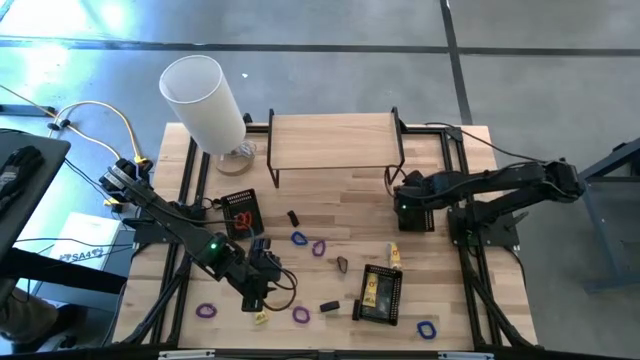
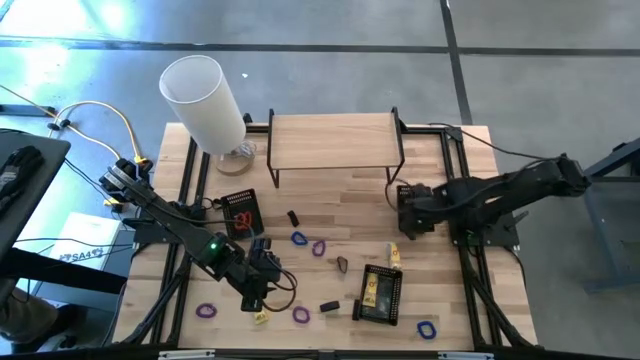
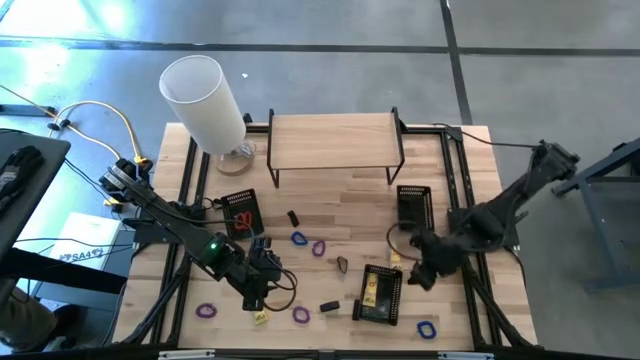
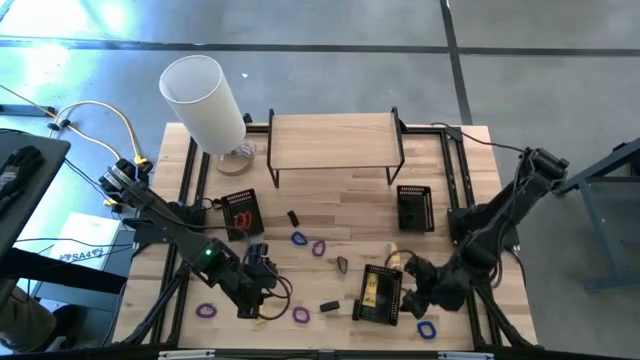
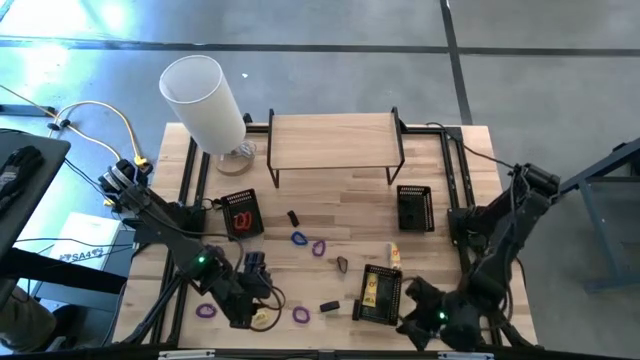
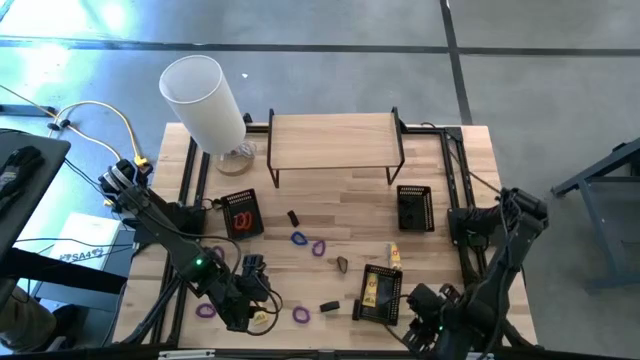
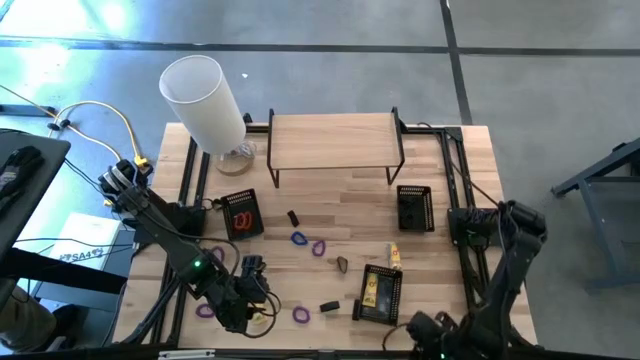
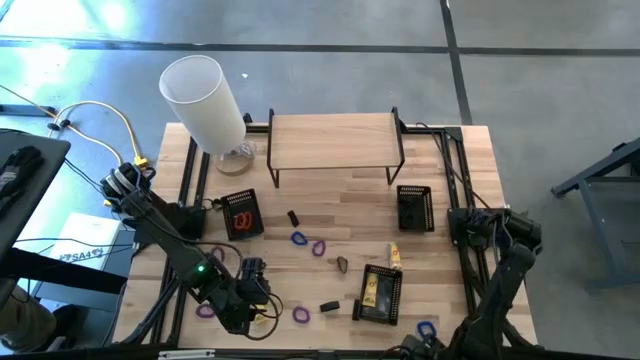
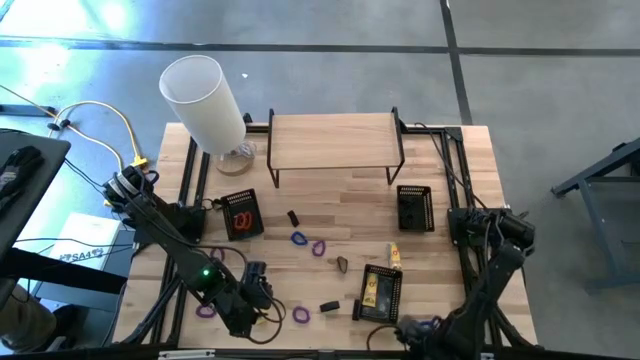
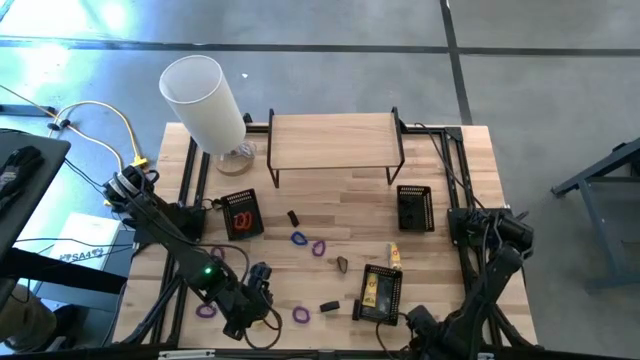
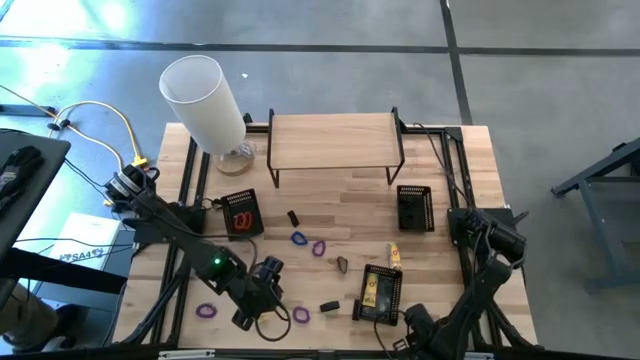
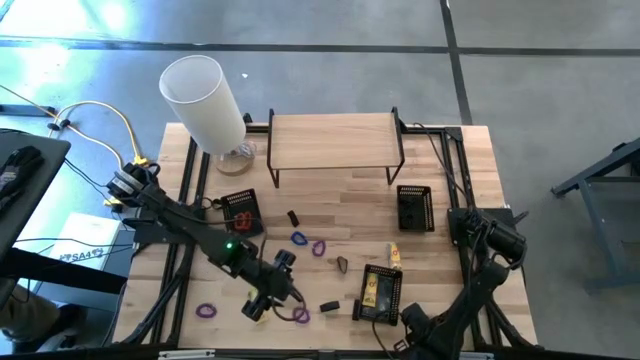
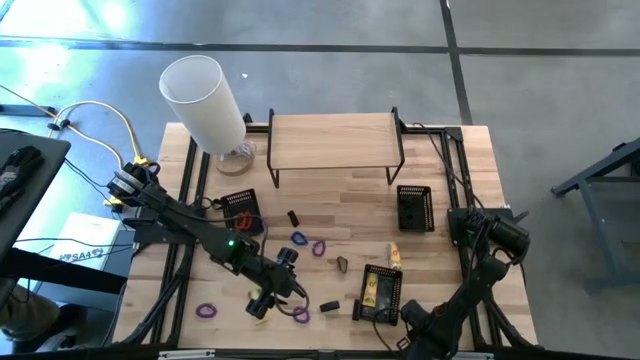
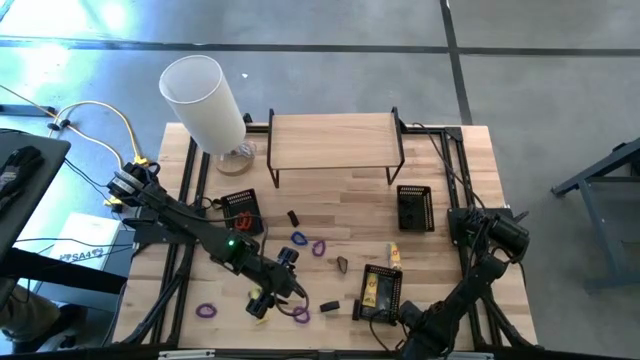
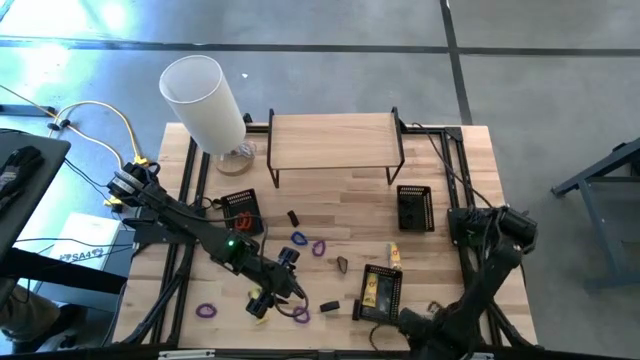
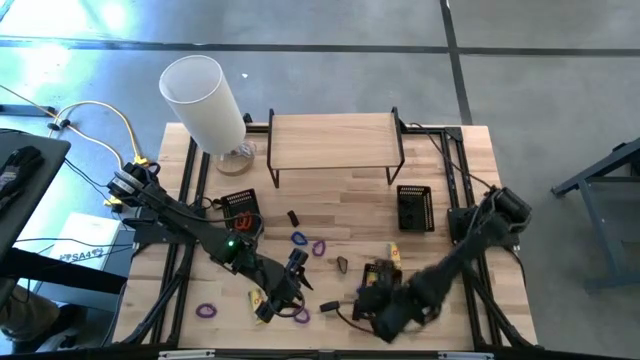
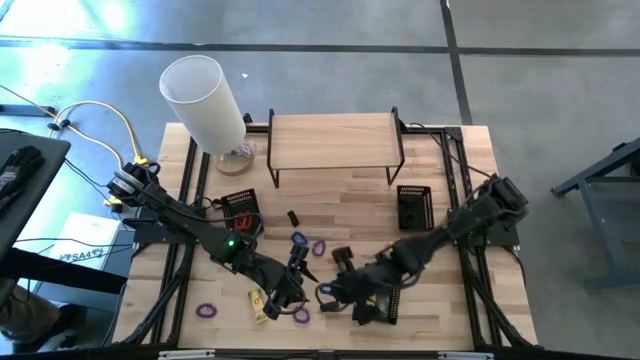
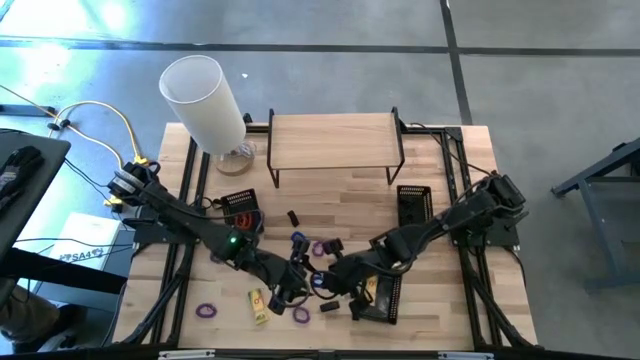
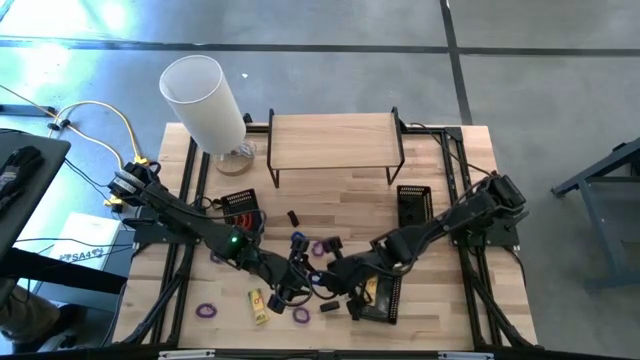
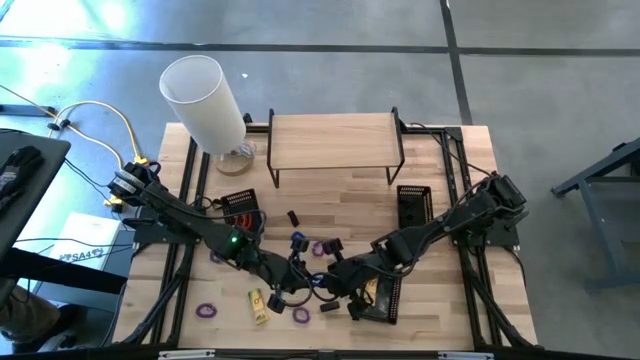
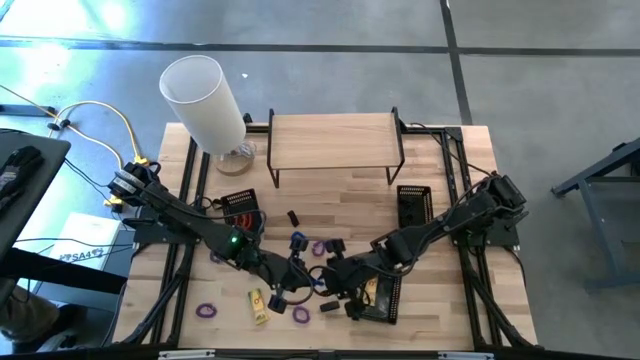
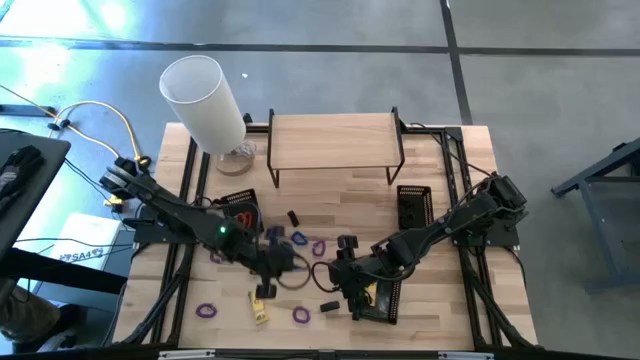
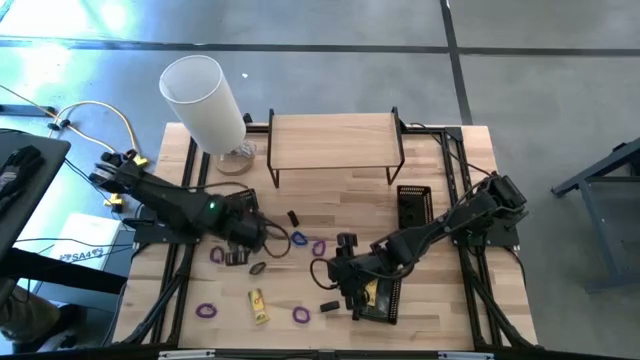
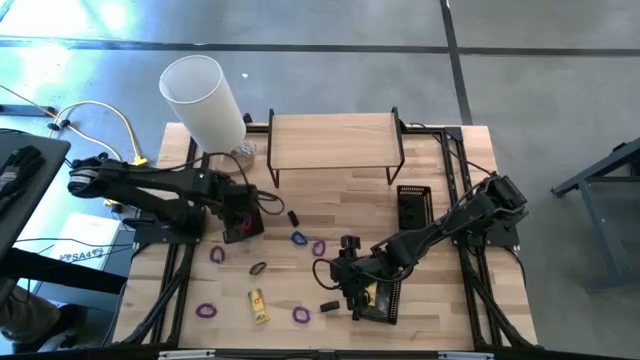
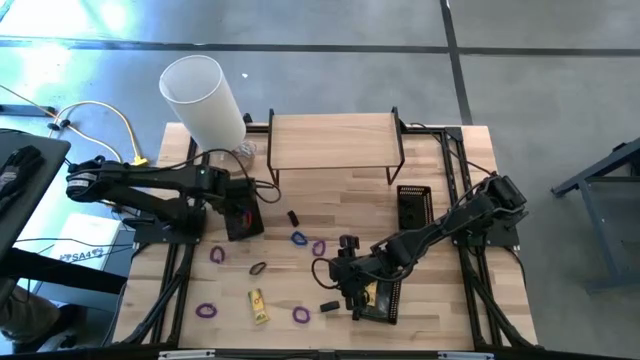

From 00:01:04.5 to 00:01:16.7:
Task: Pick & Place Office Desk Supplies
Put the bottom blue spiral keychain into the top left bin

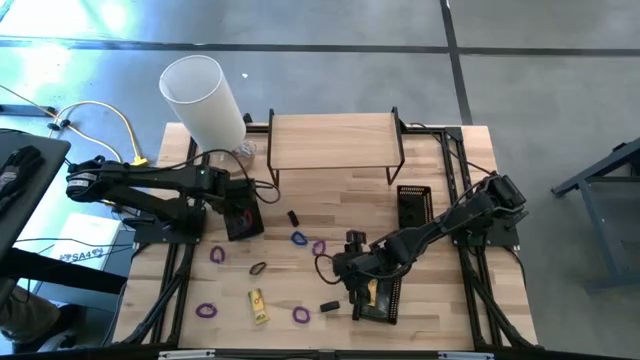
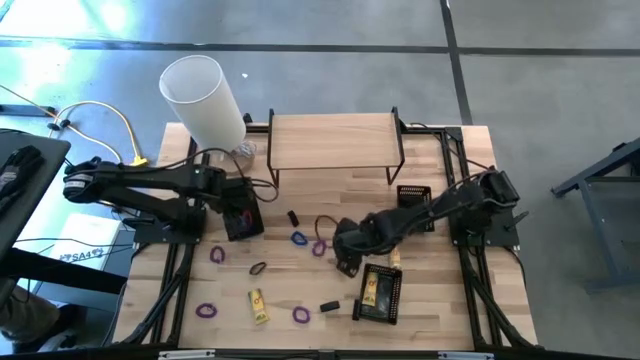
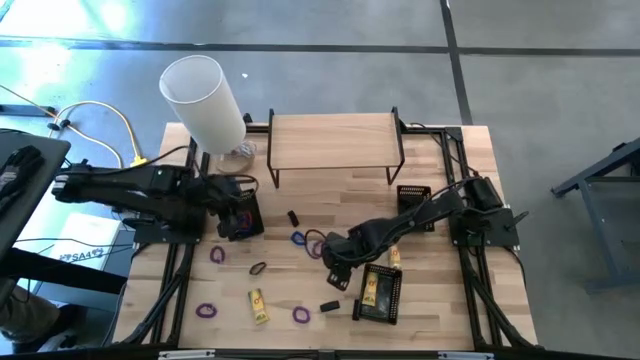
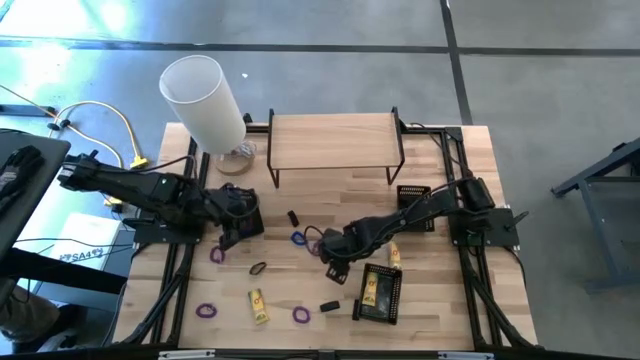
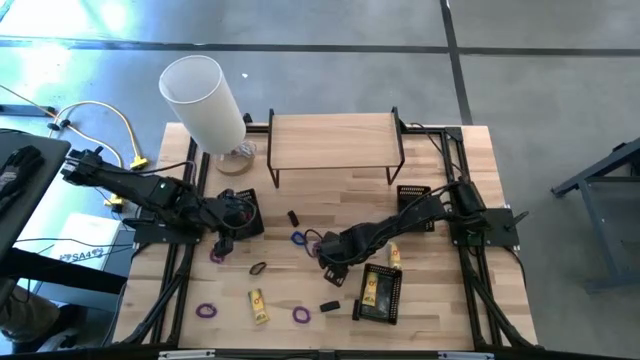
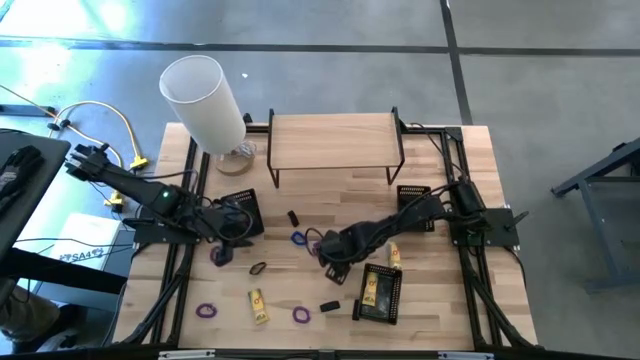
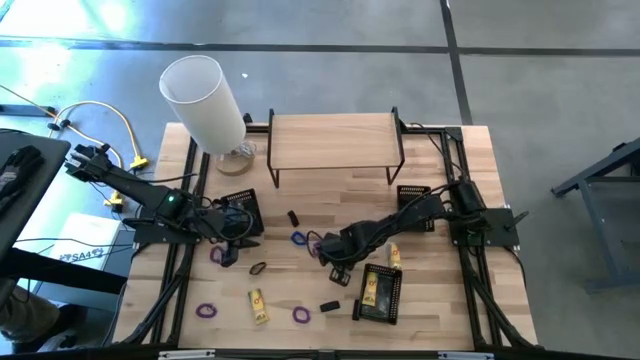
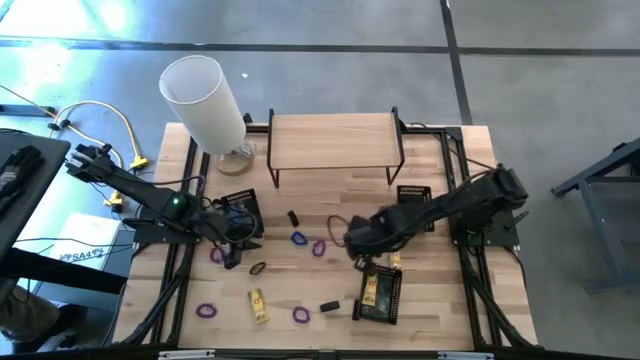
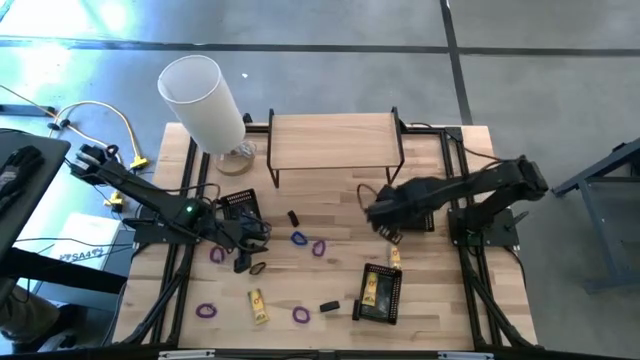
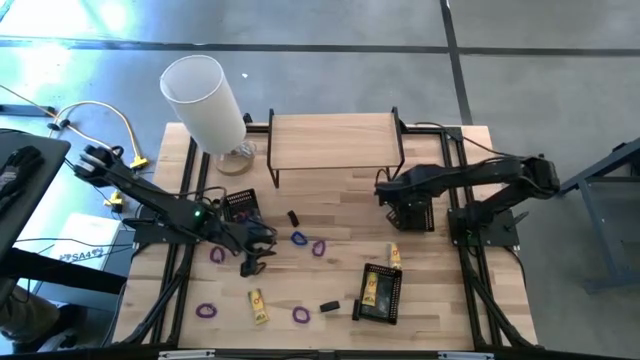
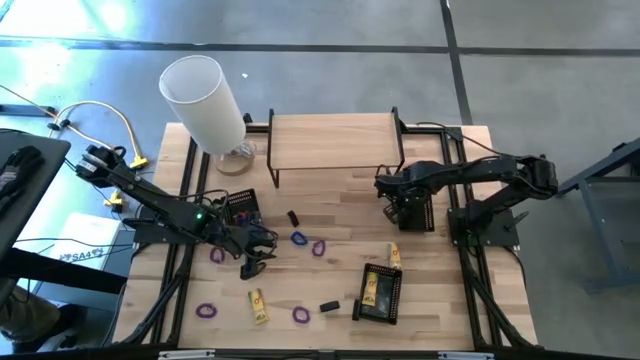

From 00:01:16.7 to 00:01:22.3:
Put the rubber band into the top right bin

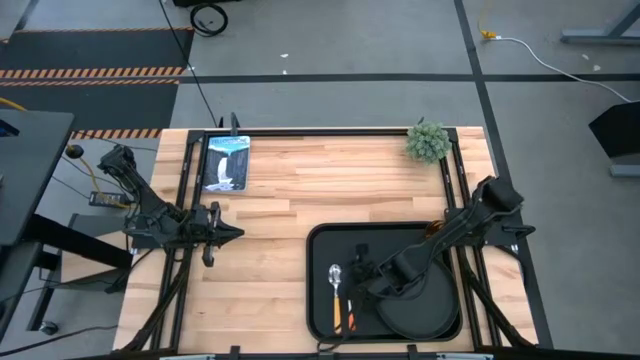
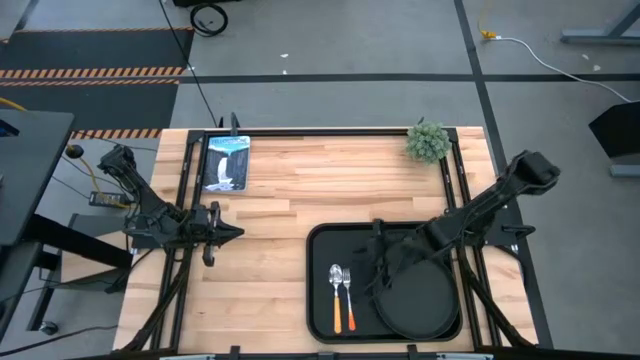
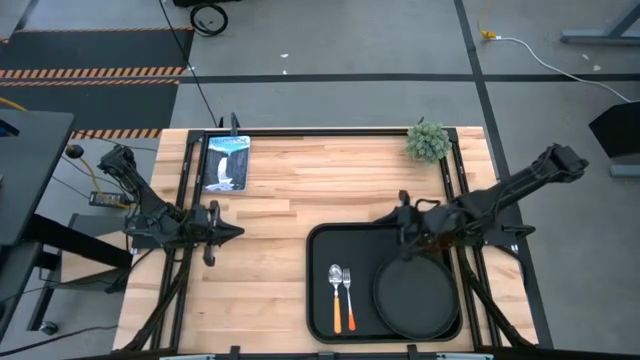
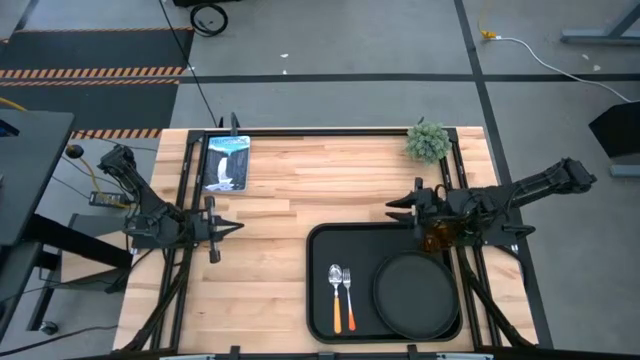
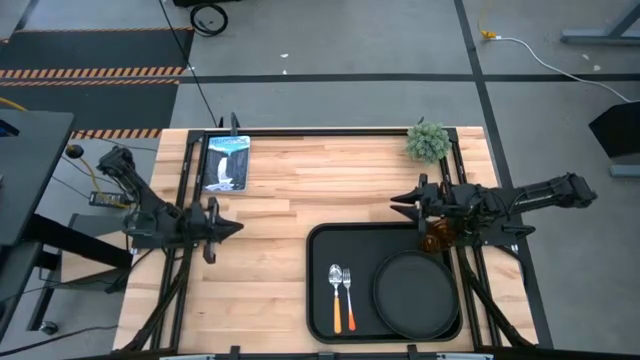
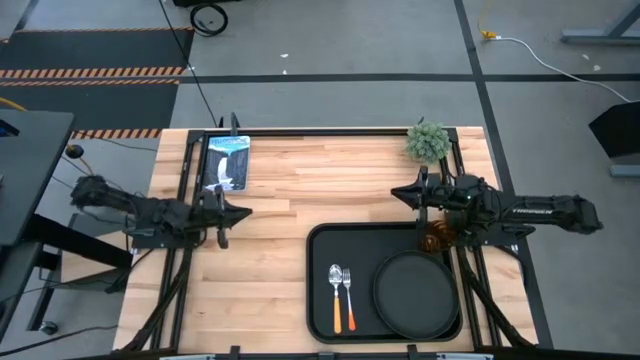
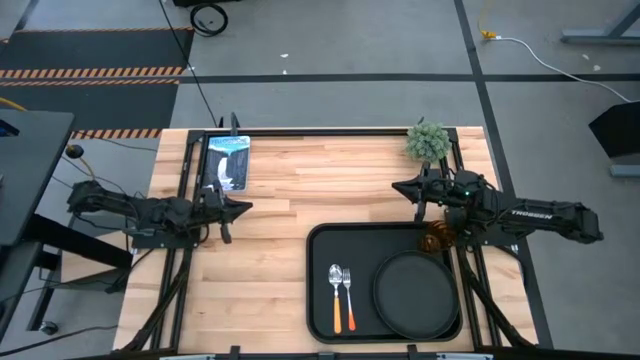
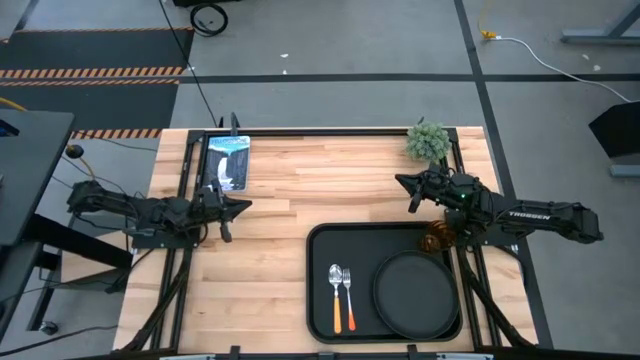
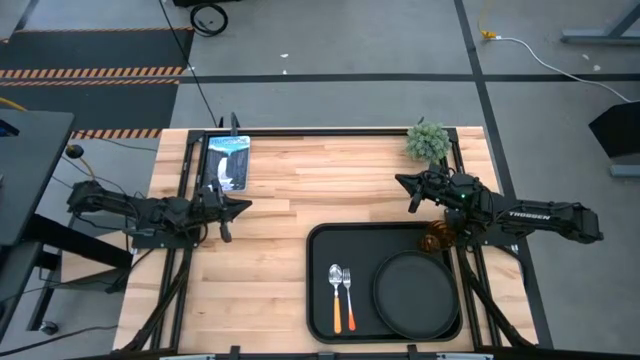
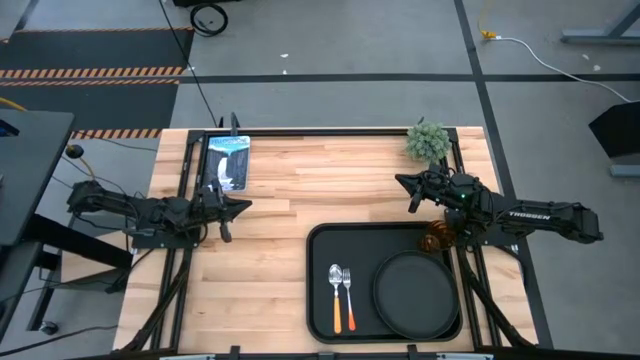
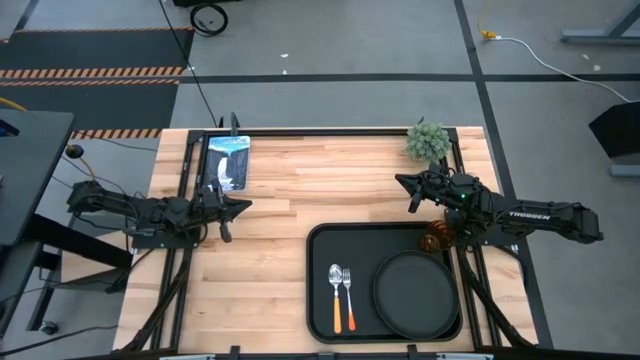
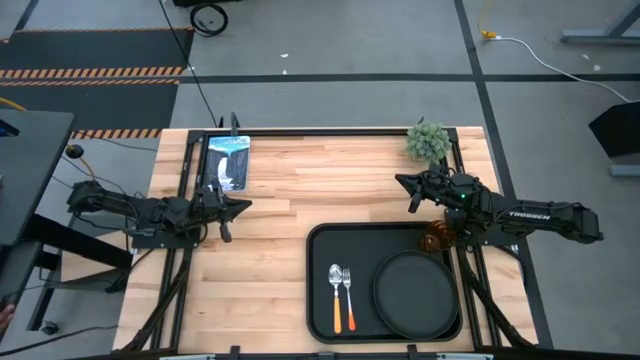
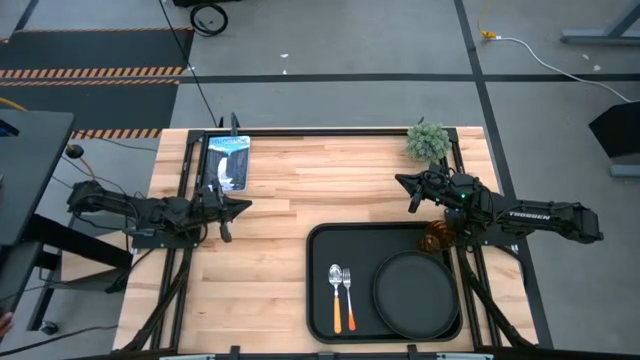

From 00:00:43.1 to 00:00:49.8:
Task: Pick and place plate/cup/fork/spoon on tray
Return to Home Position
